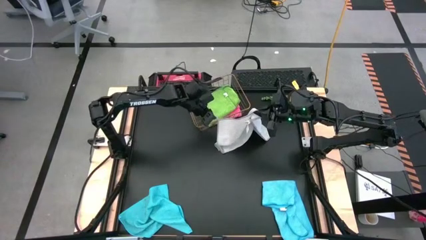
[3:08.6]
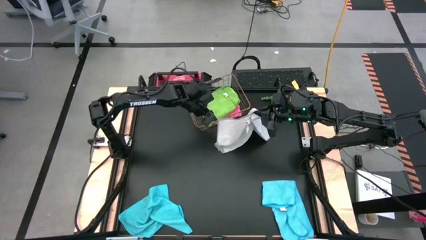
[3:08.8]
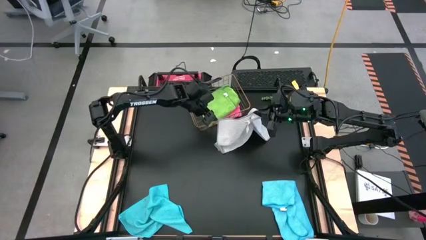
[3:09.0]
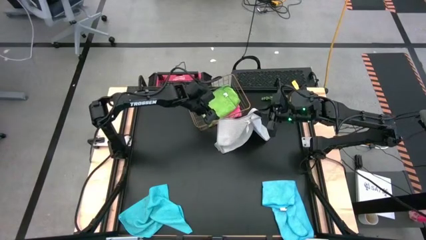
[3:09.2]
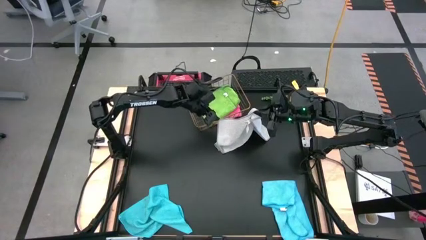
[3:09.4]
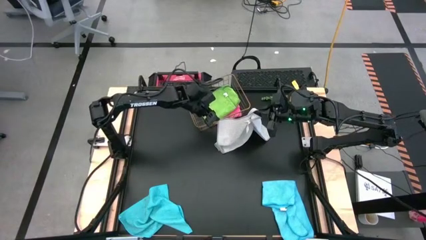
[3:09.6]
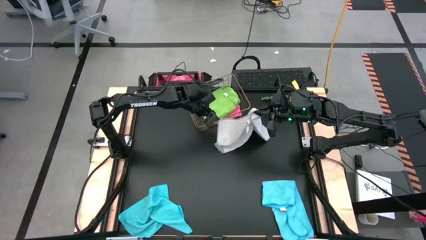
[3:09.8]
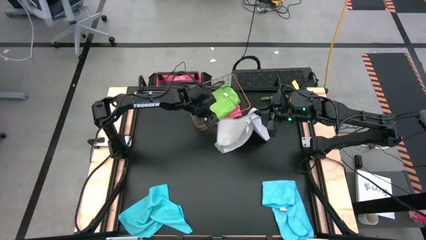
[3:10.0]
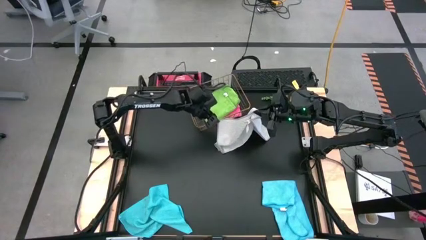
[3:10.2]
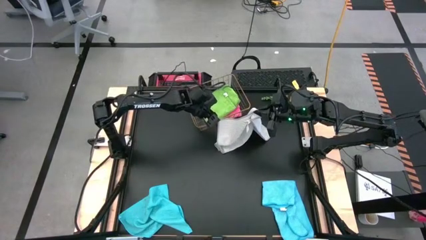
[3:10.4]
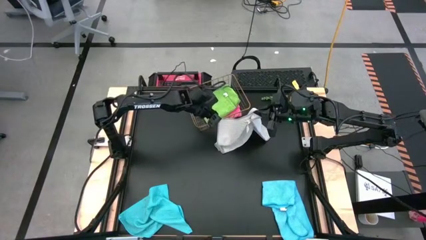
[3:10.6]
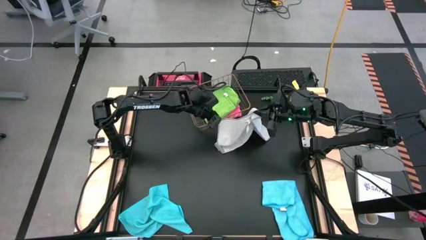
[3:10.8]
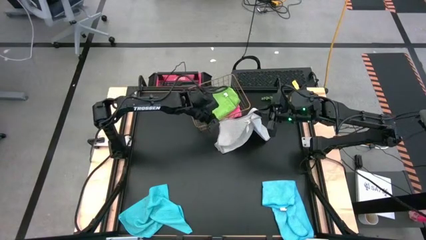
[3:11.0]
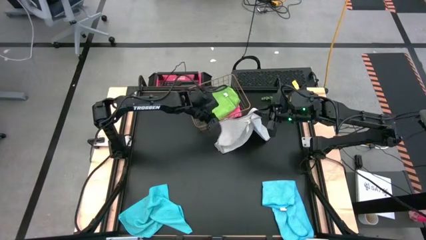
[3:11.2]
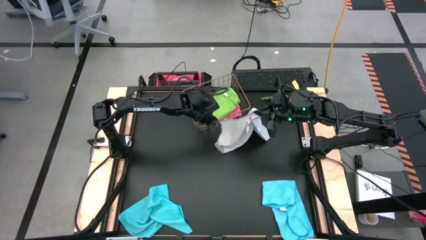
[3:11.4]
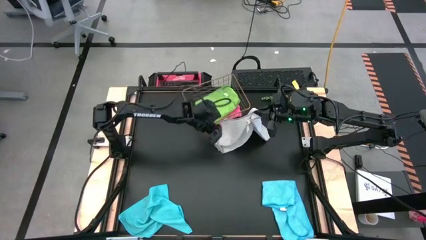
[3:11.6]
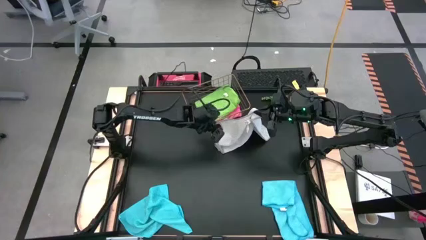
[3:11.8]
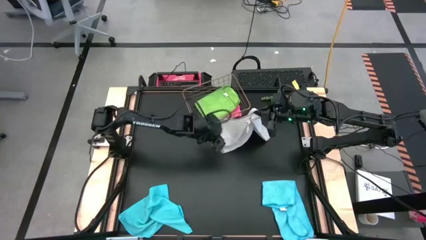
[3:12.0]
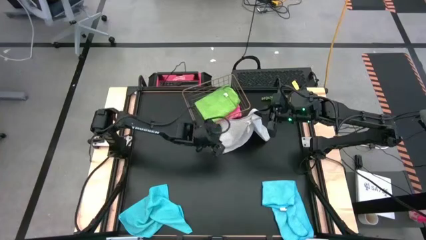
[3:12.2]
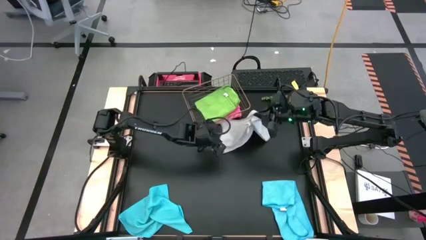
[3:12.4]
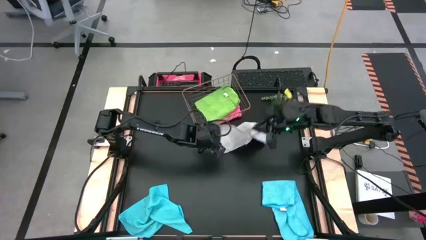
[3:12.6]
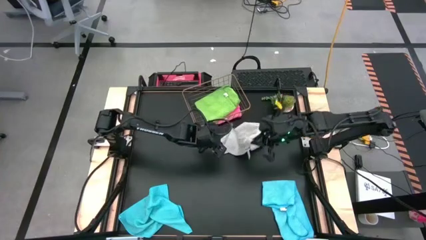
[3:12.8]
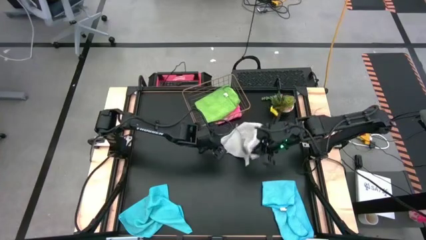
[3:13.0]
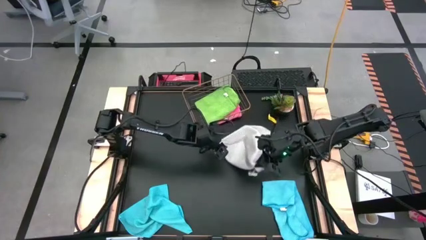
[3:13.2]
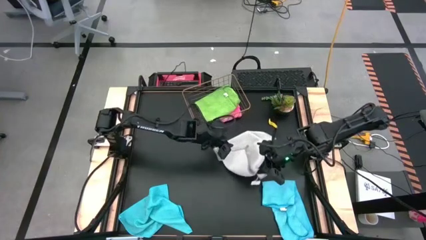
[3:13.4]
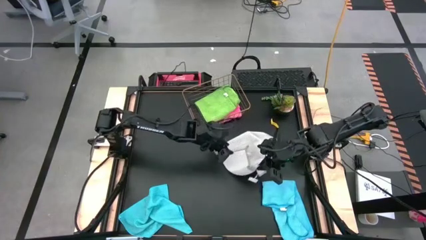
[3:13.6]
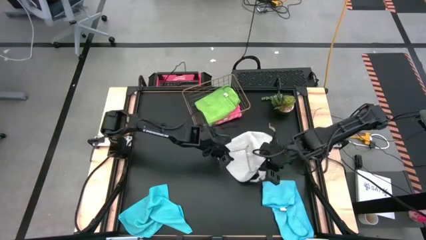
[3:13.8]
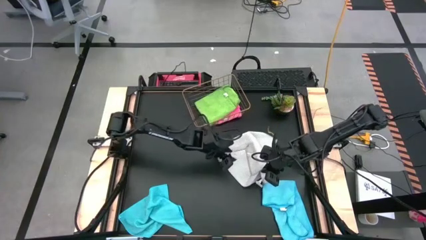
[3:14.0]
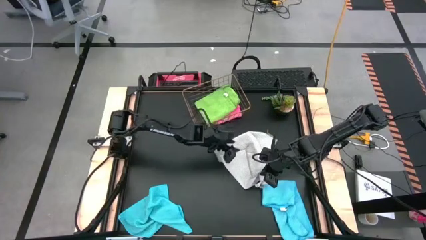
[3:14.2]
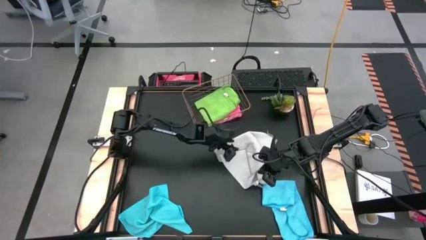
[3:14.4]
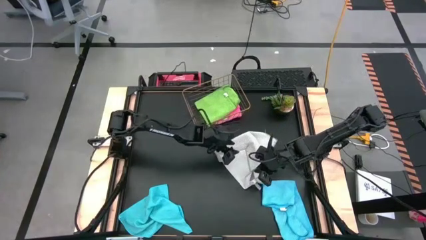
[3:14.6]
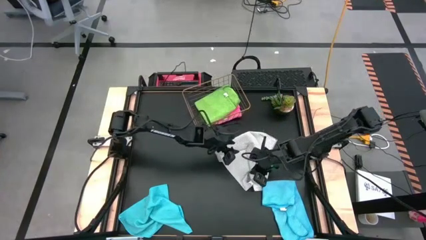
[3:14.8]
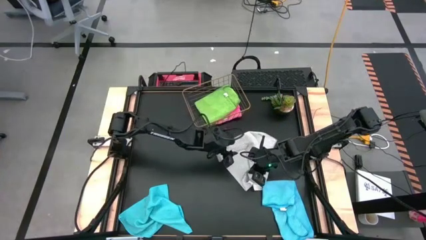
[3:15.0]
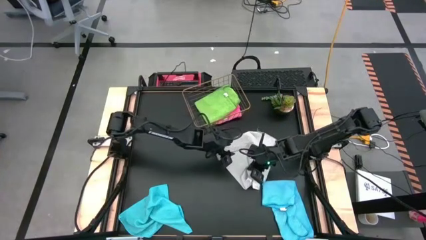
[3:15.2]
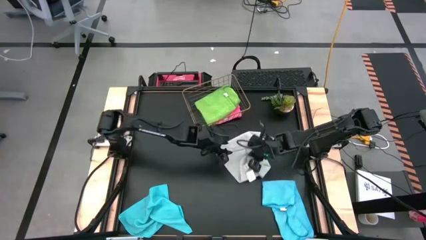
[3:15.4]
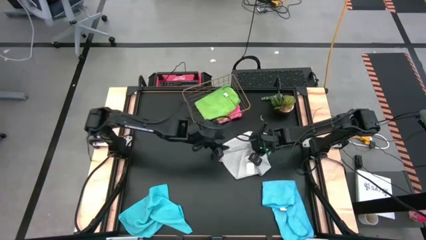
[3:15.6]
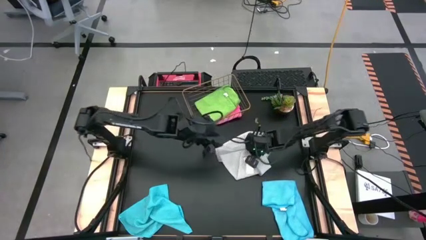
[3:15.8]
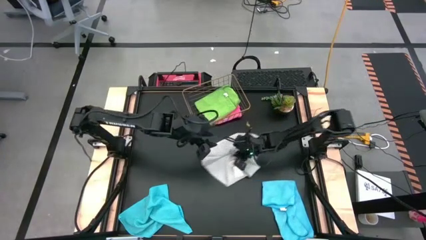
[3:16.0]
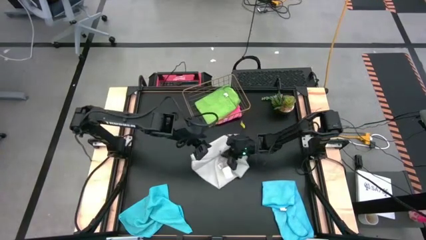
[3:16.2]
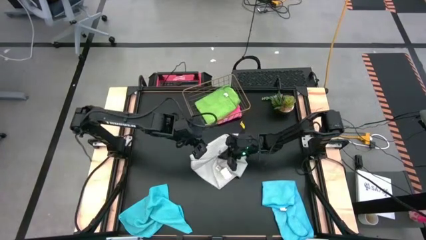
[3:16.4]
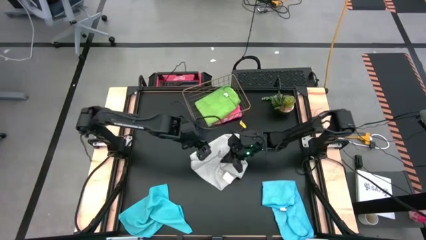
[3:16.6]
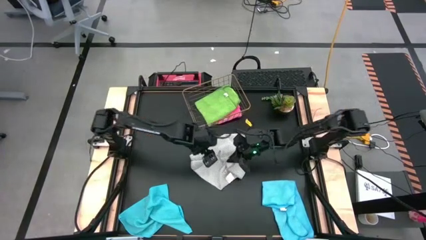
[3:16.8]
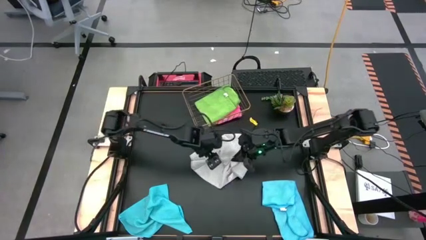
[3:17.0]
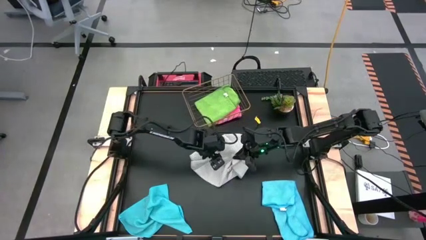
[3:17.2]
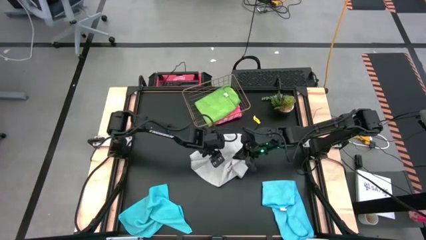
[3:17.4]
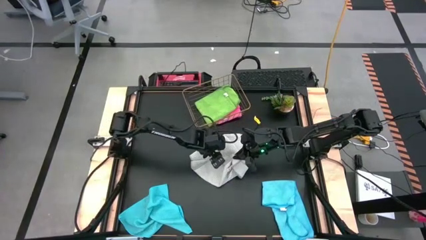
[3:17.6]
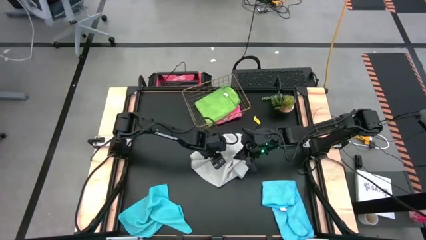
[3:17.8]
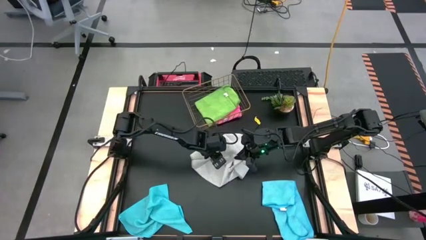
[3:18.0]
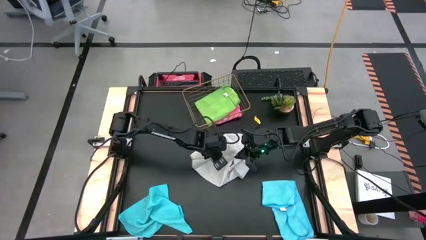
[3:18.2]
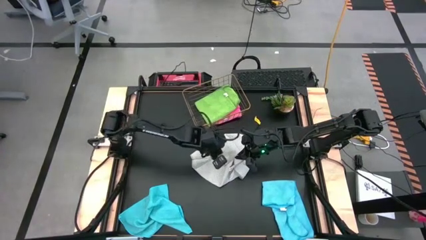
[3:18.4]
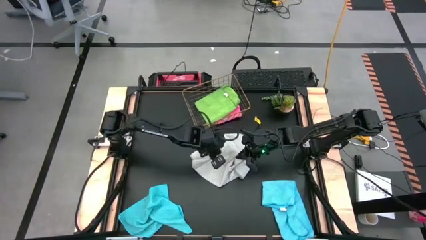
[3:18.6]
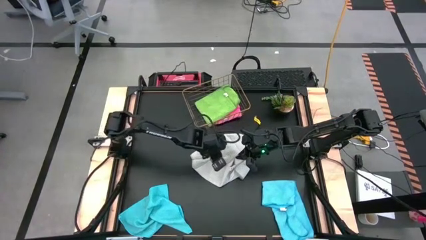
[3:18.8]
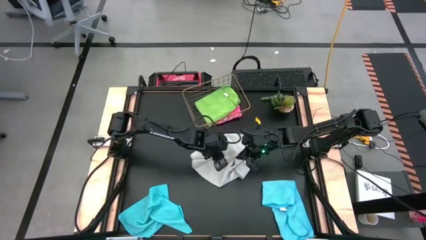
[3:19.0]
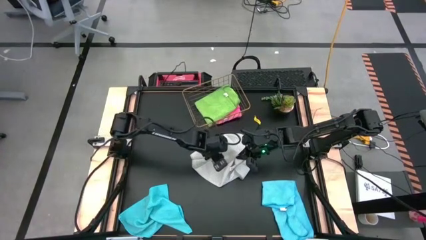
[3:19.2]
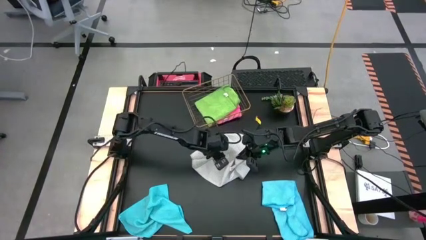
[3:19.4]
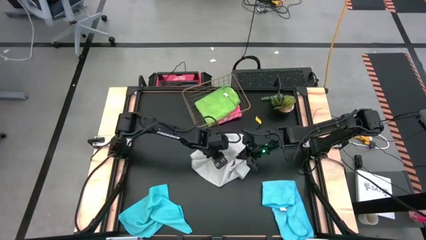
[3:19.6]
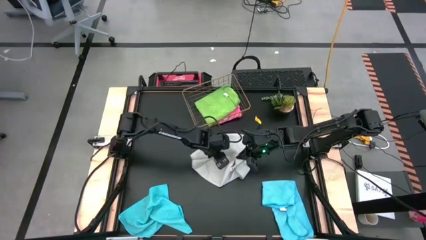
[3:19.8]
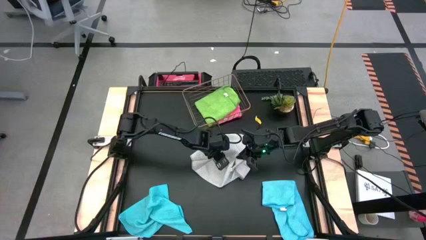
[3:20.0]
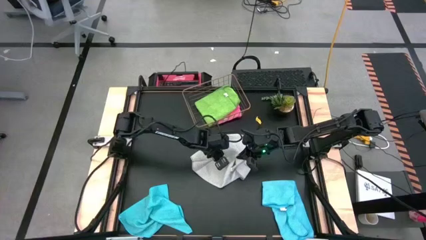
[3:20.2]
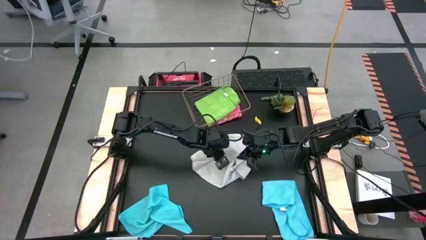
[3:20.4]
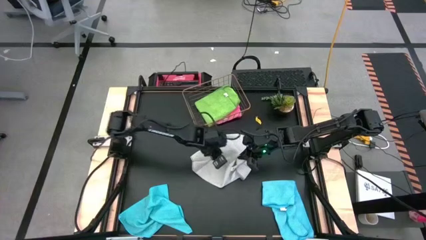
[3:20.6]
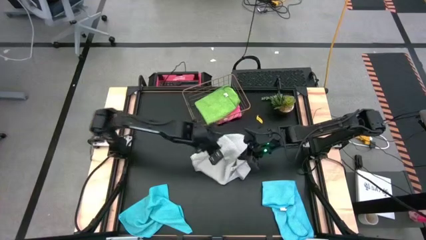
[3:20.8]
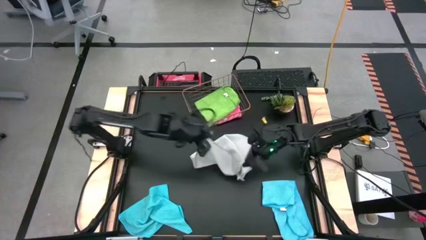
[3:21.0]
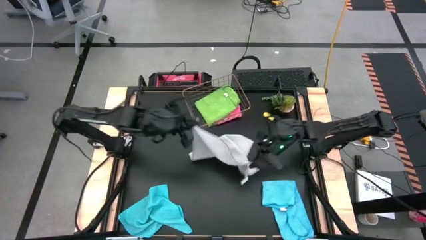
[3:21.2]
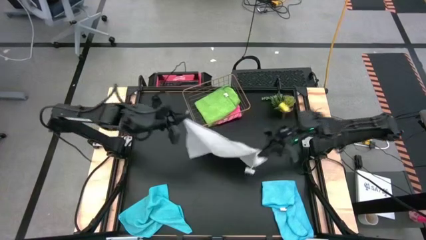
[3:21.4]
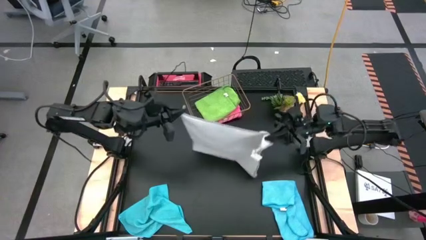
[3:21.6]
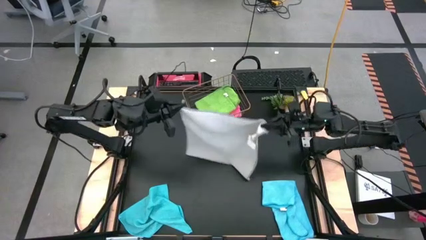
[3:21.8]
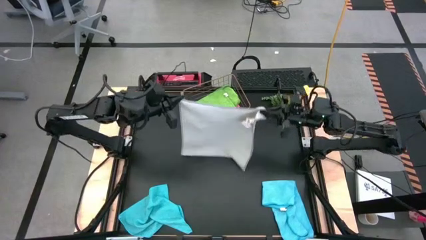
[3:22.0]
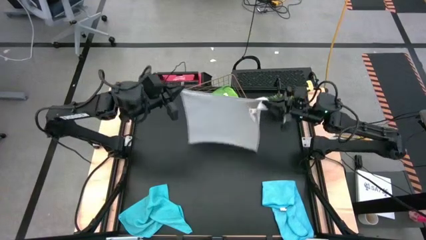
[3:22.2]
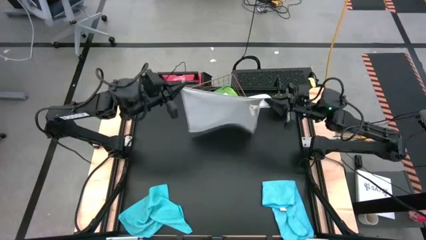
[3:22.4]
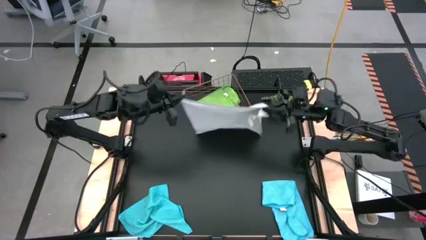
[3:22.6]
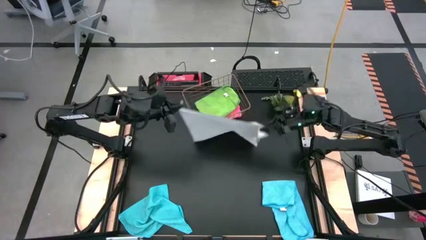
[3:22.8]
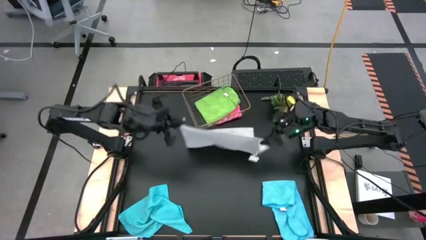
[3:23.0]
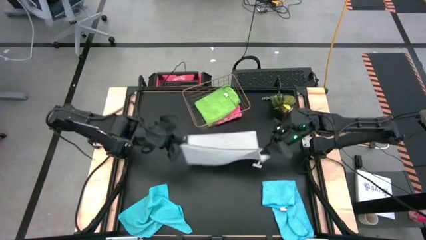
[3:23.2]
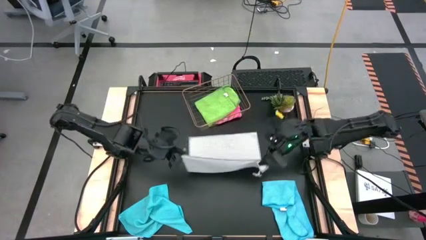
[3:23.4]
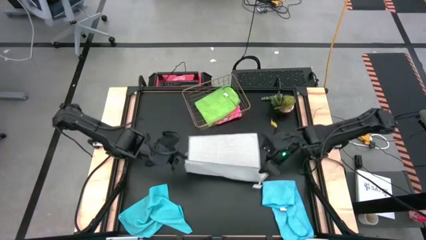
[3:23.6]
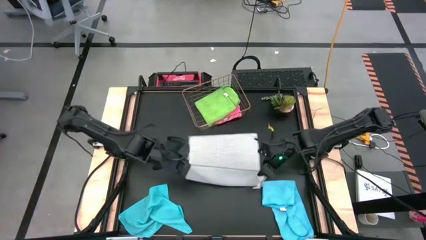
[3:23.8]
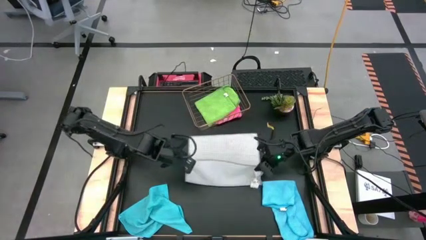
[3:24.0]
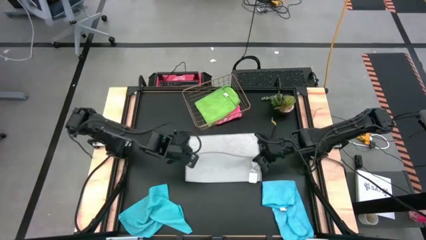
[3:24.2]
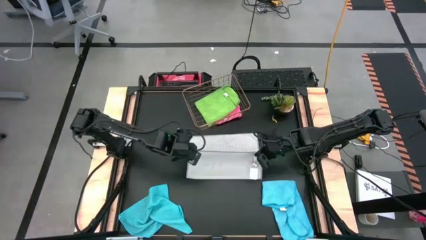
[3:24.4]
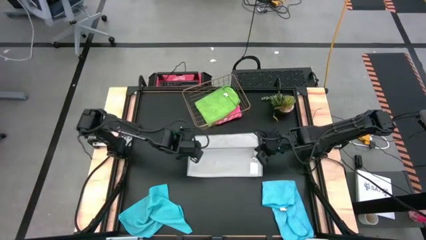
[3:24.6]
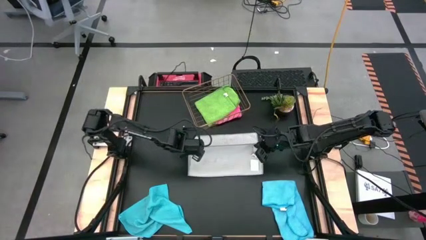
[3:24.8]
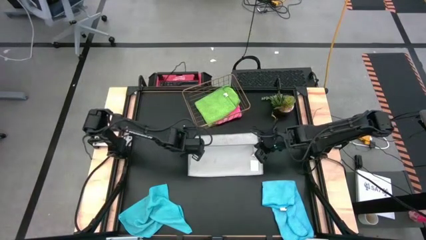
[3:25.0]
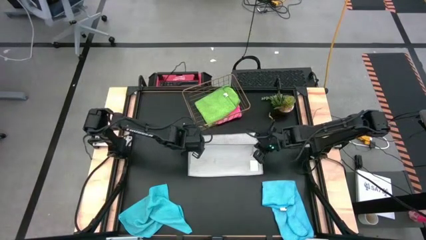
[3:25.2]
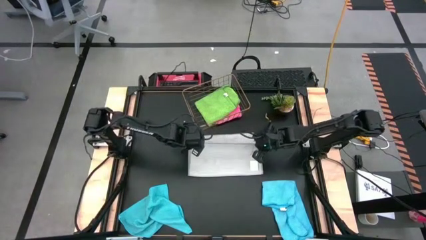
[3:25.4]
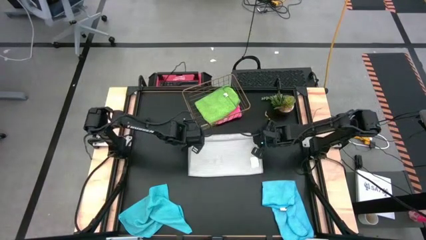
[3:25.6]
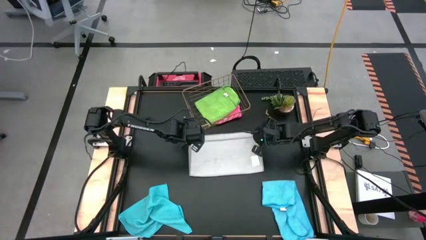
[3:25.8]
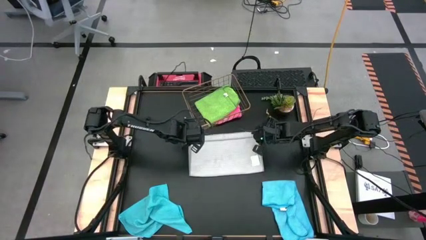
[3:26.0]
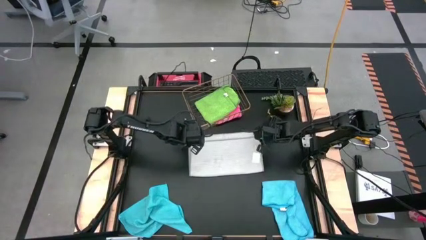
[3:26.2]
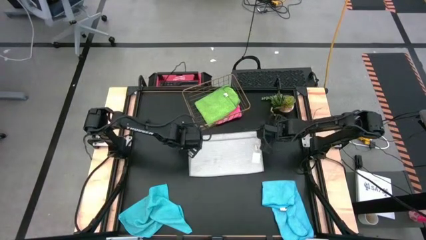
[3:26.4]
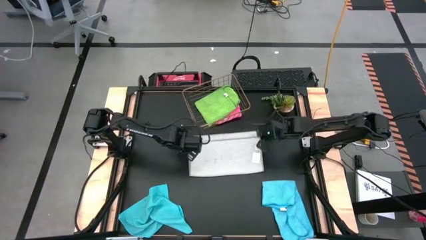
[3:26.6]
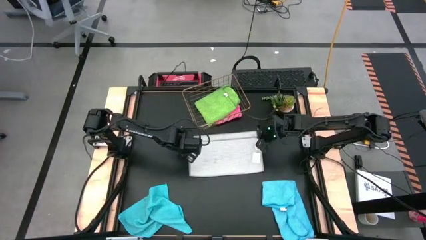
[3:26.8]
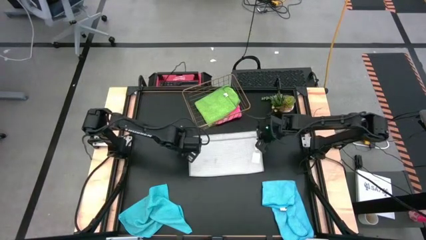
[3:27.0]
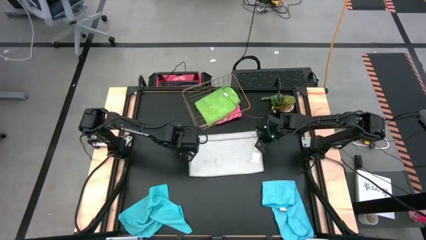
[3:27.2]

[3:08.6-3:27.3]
Task: Fold microfiber towels
Fold the gray microfiber cloth
